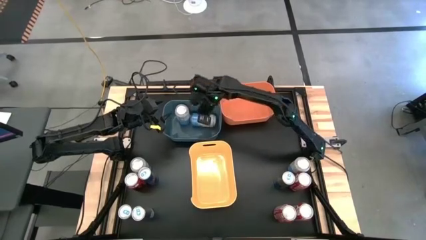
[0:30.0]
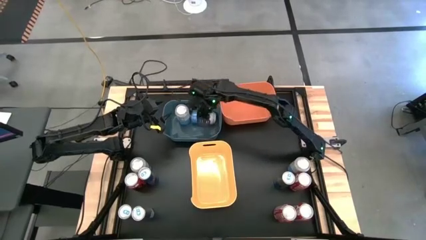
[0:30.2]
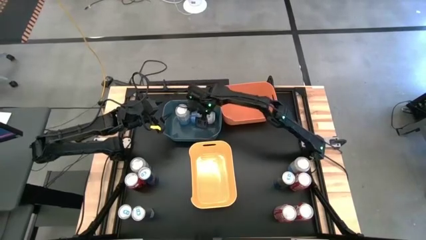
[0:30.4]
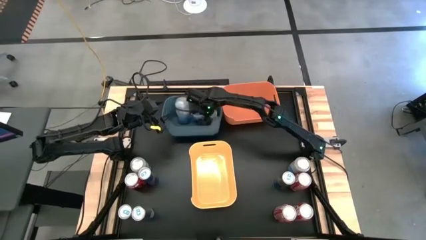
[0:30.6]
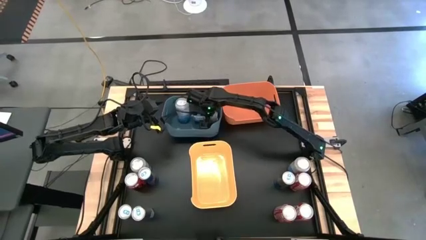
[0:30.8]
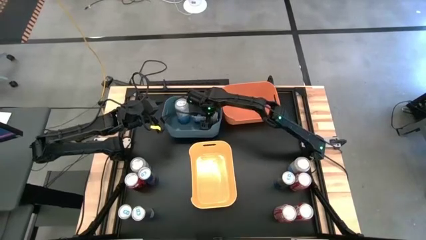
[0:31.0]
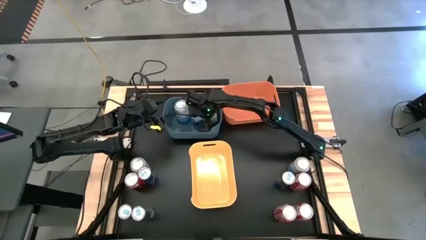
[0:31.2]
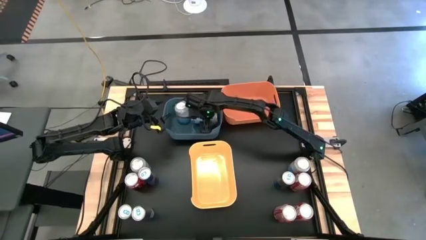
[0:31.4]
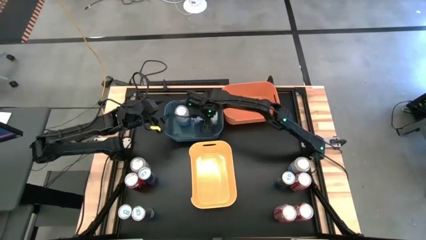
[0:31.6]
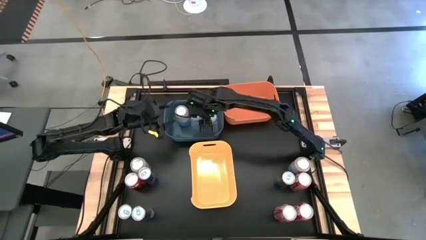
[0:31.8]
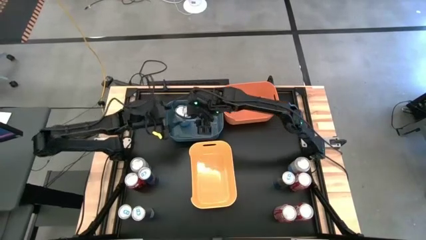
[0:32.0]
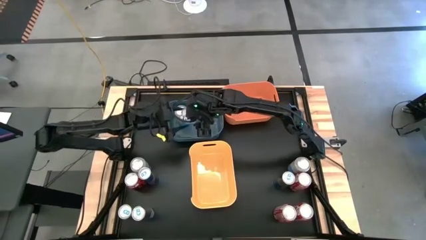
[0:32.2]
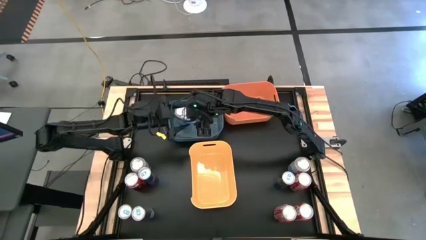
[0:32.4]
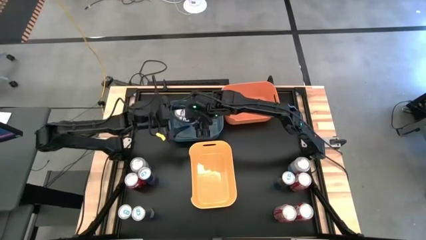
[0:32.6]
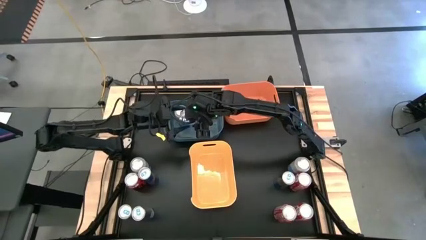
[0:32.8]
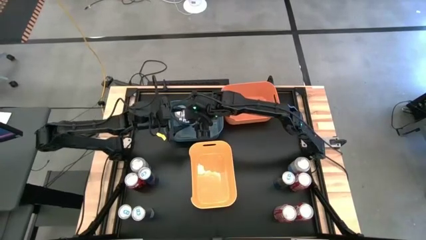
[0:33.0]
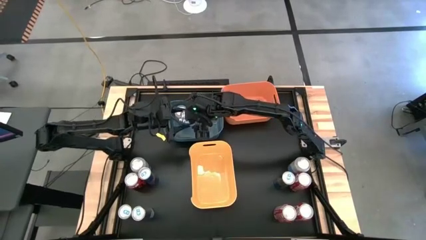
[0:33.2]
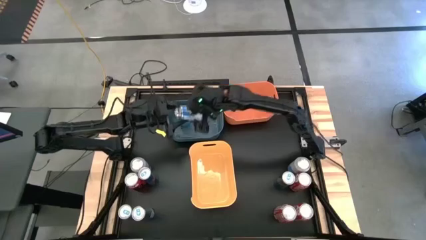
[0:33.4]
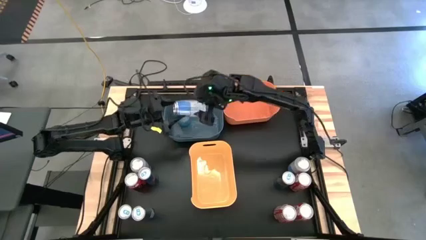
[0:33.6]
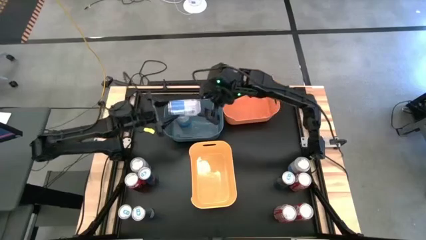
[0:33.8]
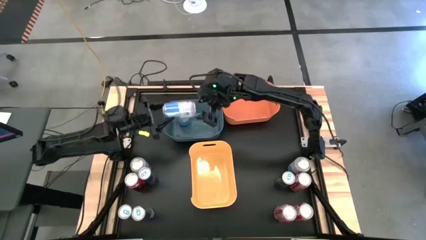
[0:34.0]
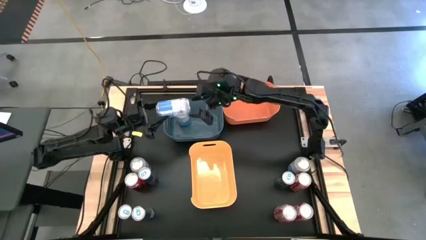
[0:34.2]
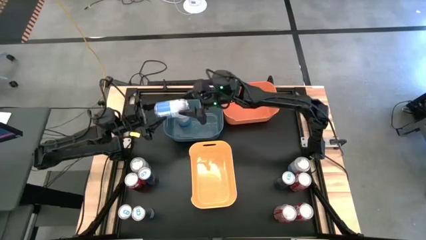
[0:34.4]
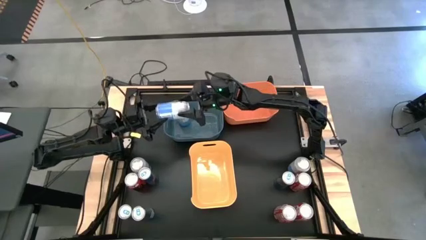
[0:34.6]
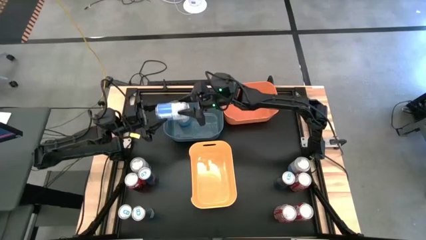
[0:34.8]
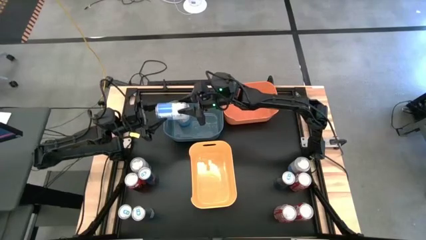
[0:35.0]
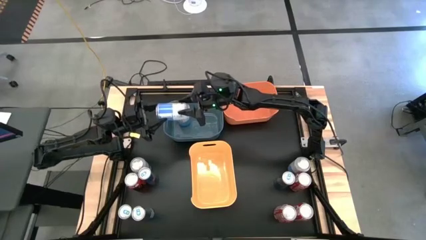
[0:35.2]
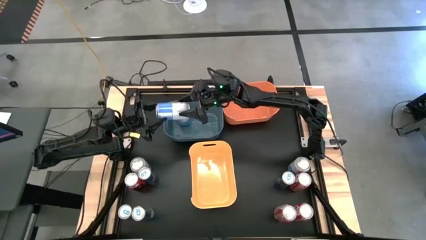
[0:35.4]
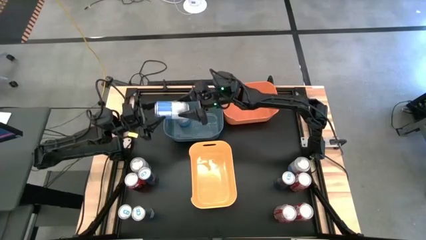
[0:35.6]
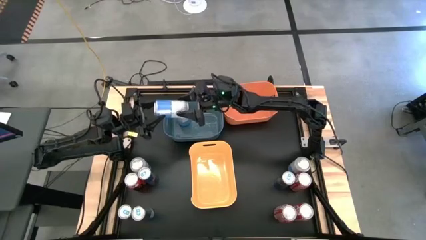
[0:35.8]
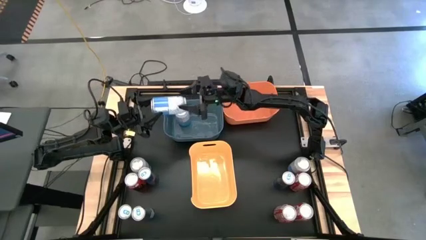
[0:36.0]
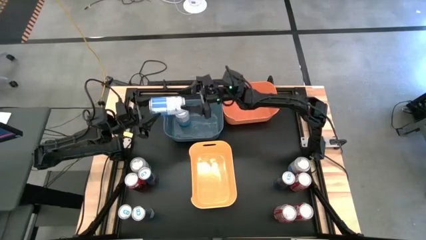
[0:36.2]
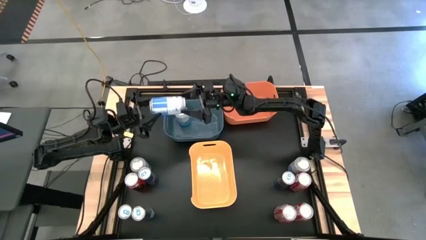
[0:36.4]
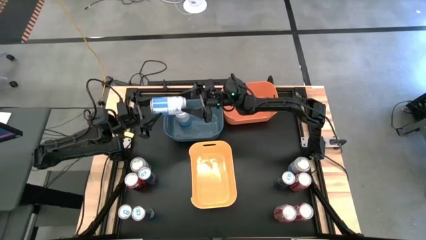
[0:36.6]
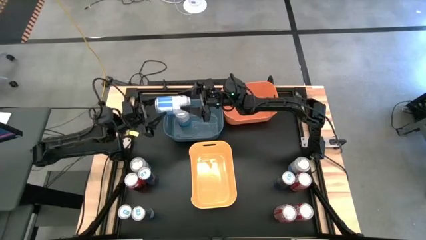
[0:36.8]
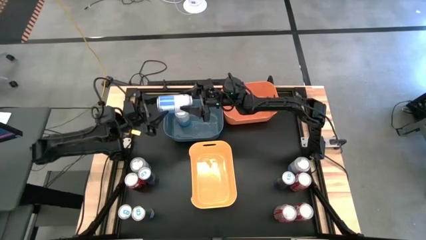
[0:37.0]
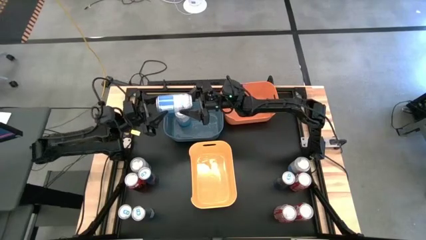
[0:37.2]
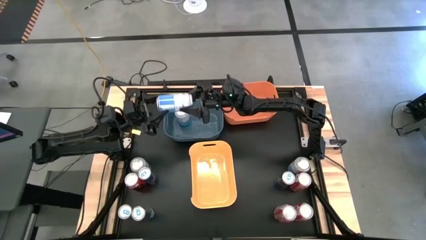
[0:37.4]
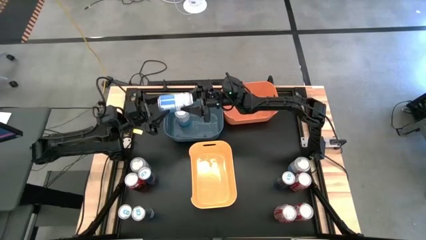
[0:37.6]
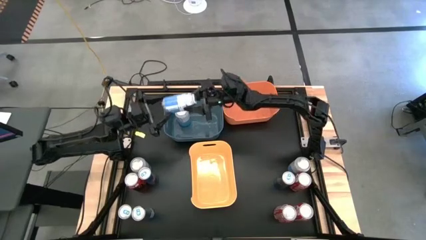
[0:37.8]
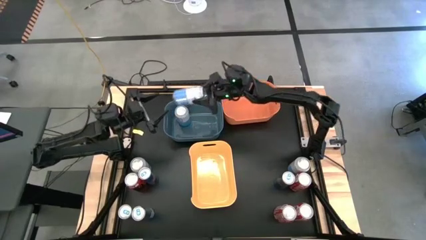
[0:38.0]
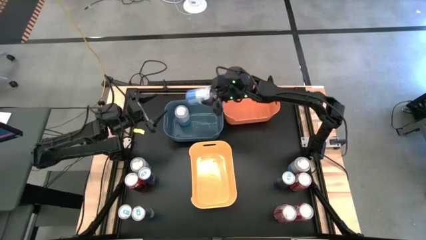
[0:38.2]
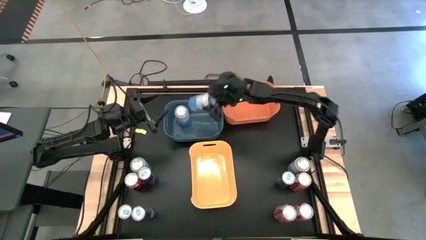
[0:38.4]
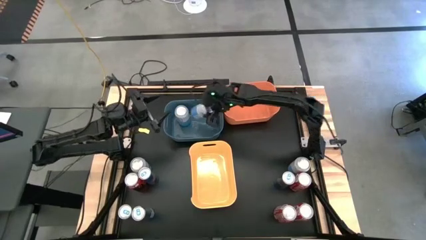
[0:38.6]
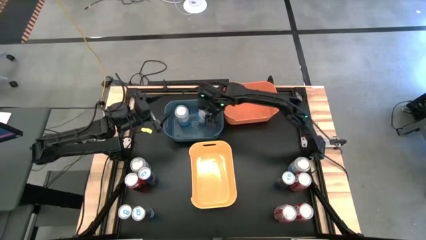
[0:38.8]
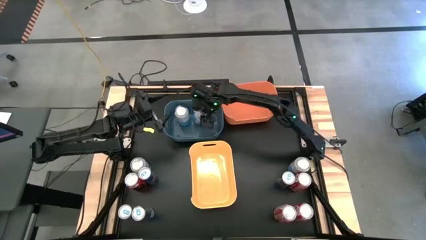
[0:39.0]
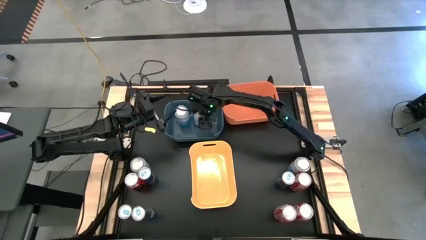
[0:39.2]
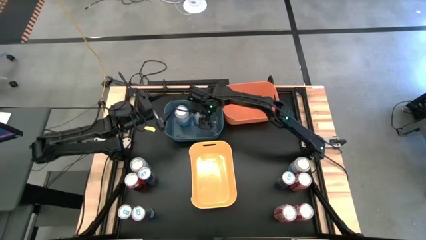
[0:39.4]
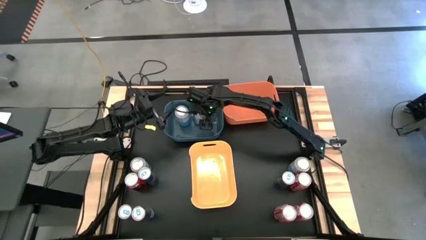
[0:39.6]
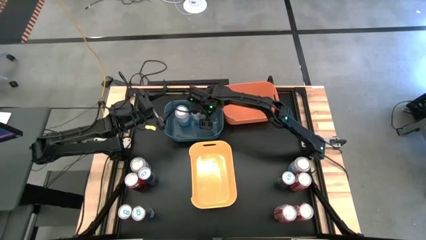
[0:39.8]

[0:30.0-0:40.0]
Task: Sort soda cans
Put the top blue-white soda can into the blue bin
